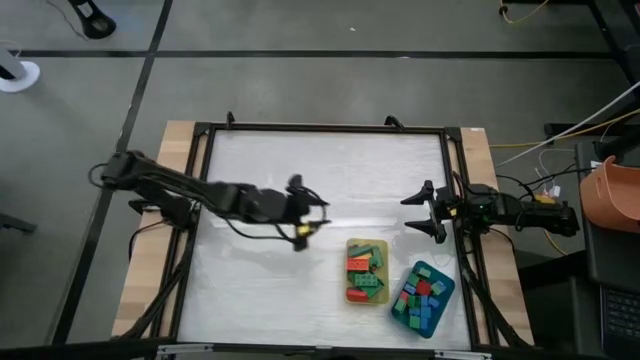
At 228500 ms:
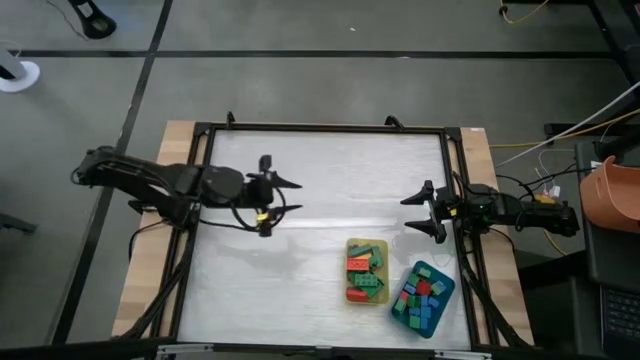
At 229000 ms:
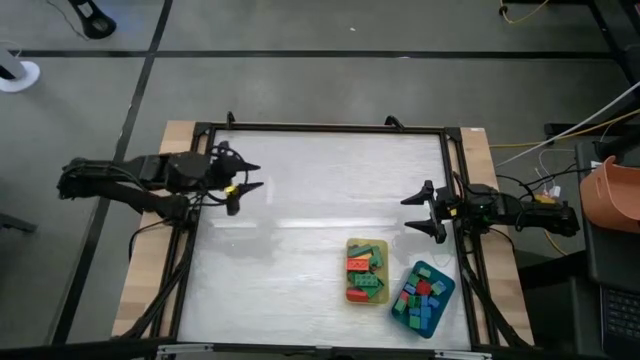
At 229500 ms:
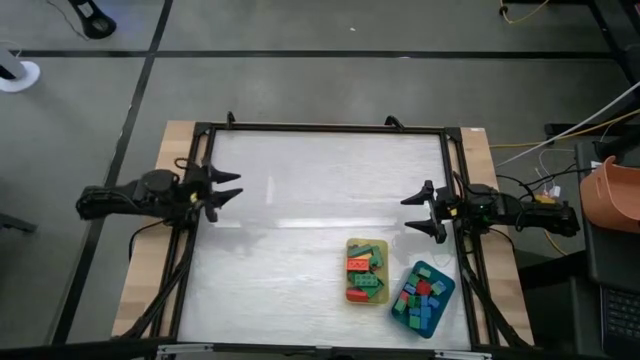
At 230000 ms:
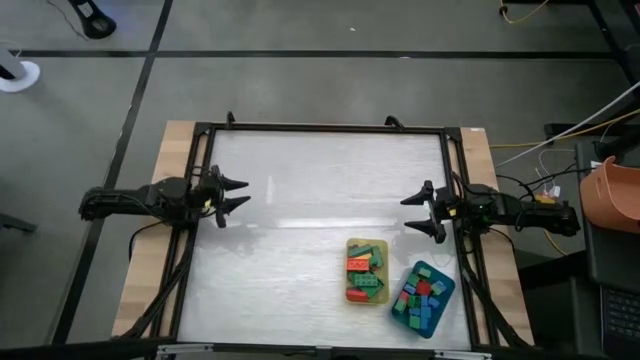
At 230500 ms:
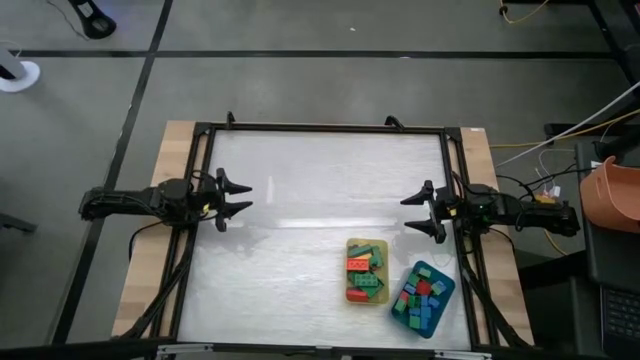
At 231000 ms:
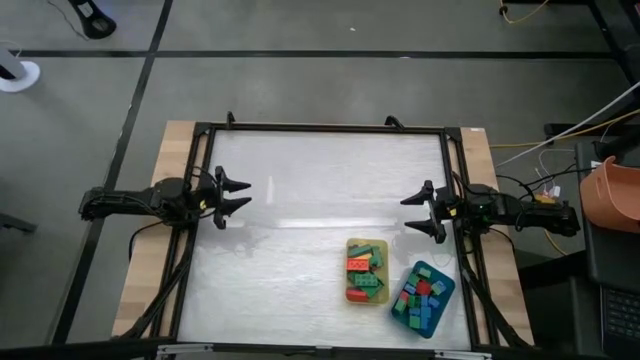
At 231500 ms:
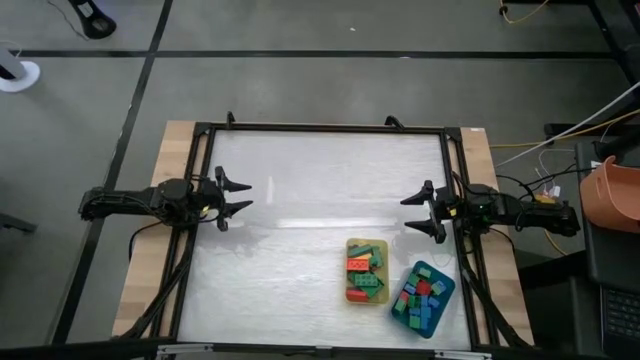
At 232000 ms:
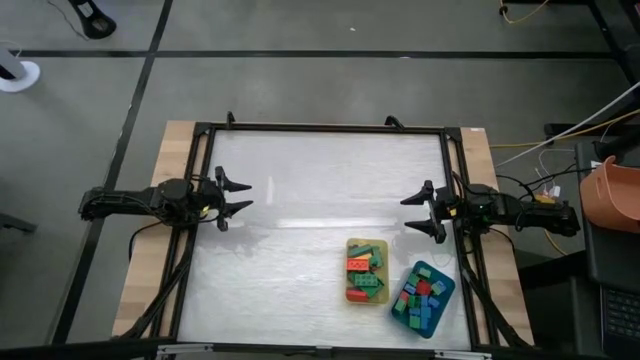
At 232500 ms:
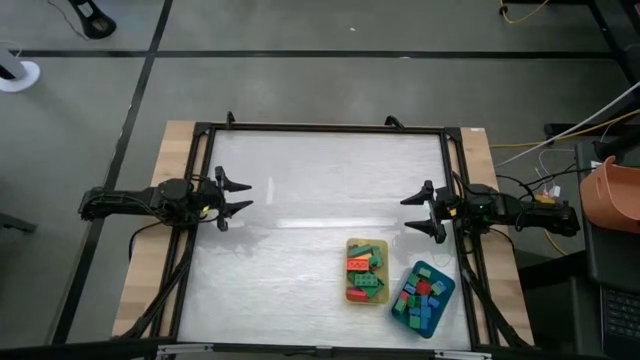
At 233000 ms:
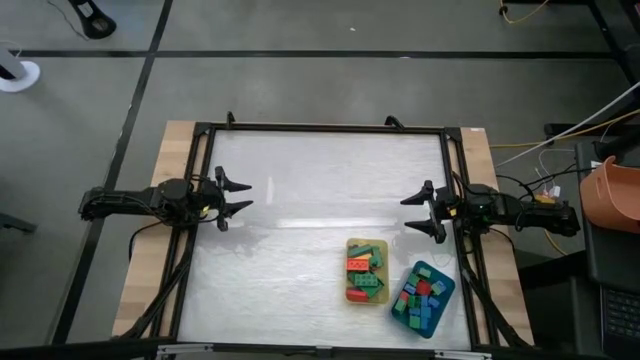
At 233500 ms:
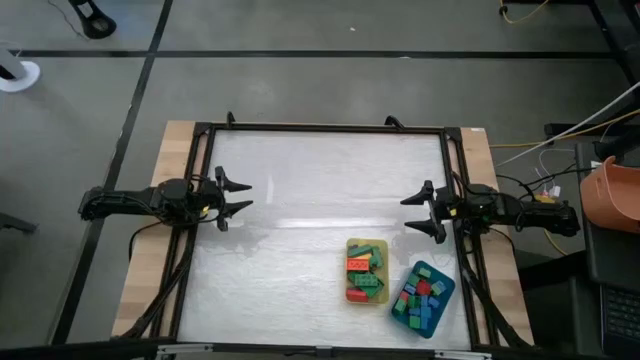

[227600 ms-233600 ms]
Task: Sort blocks by size
Return to Home Position

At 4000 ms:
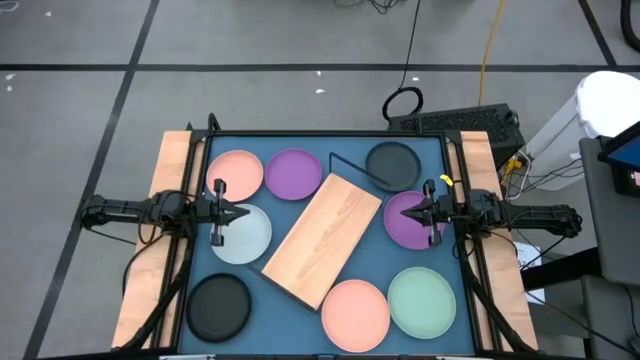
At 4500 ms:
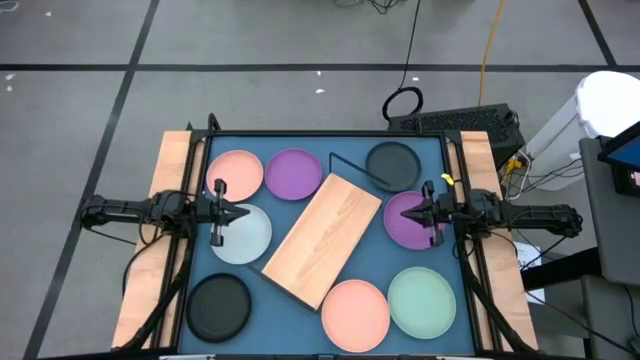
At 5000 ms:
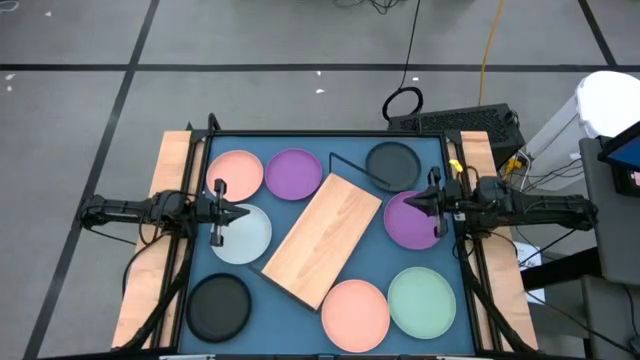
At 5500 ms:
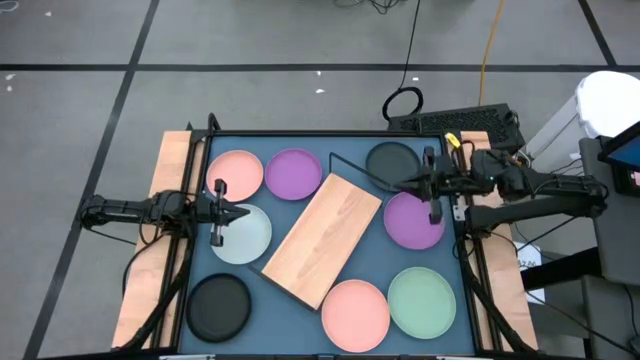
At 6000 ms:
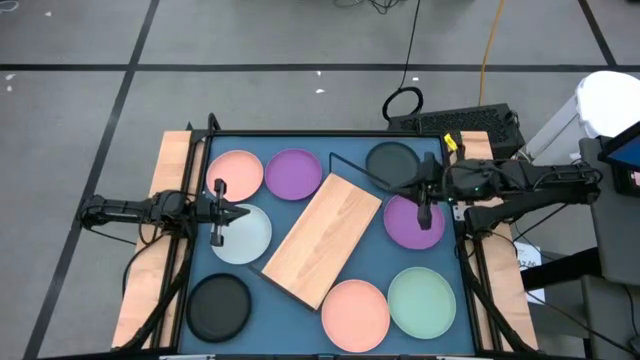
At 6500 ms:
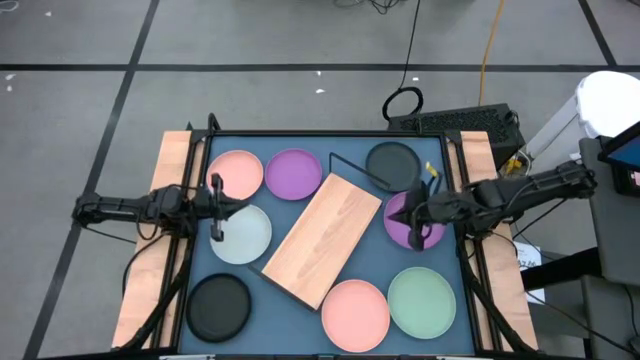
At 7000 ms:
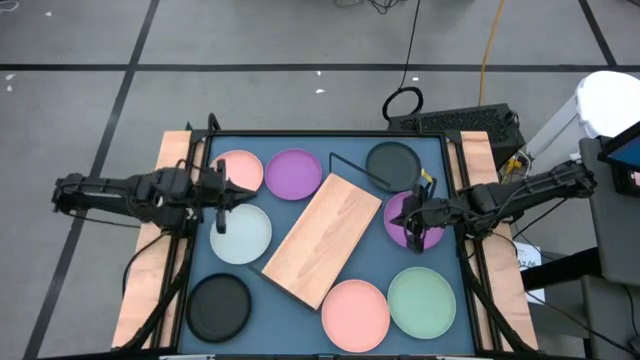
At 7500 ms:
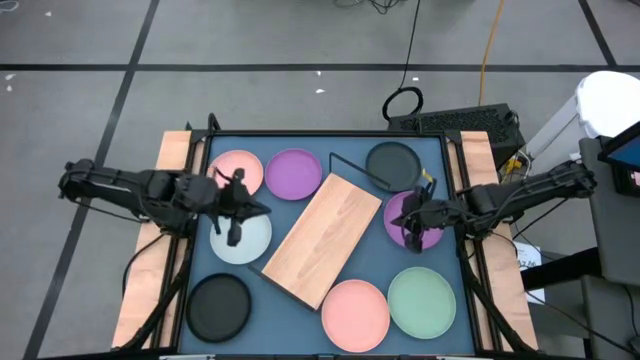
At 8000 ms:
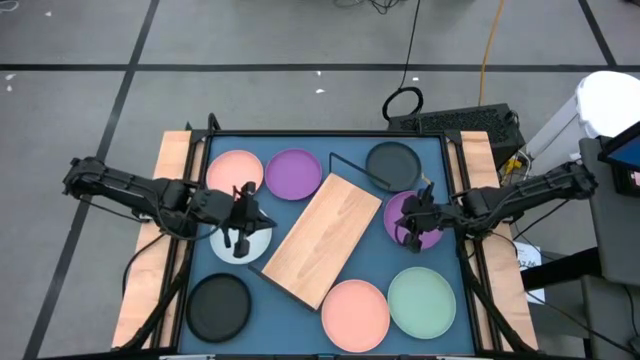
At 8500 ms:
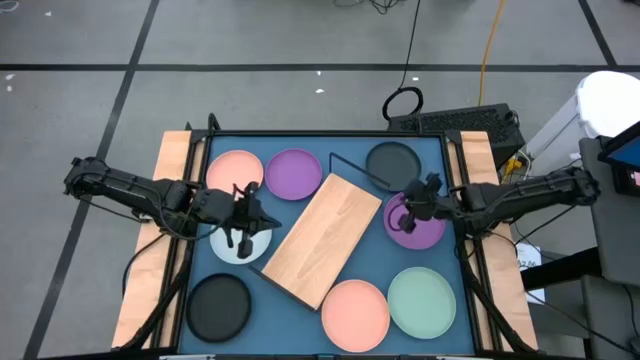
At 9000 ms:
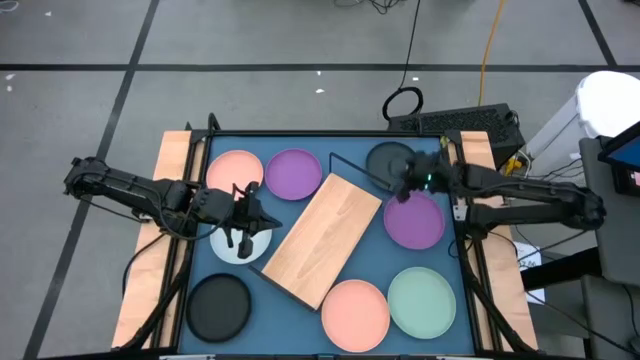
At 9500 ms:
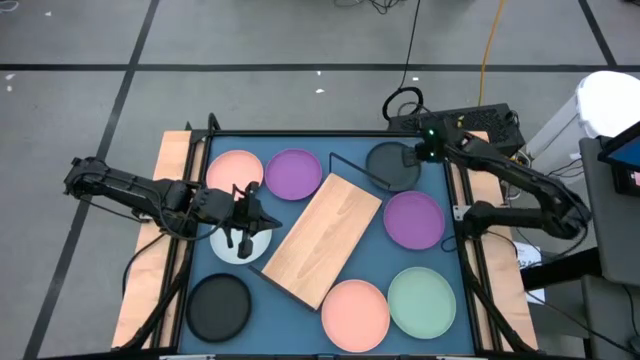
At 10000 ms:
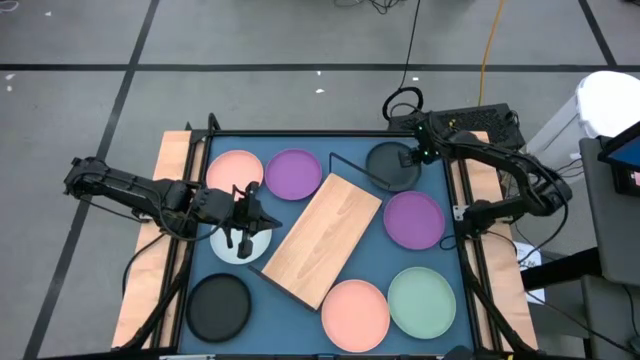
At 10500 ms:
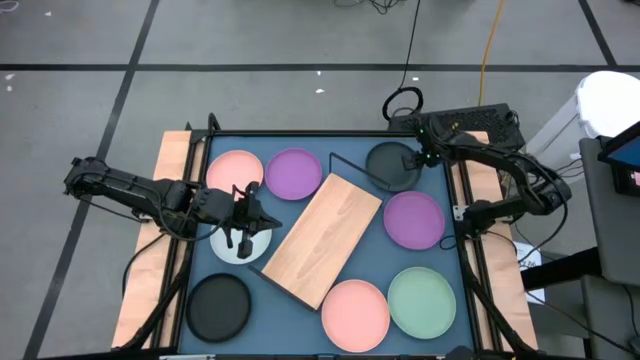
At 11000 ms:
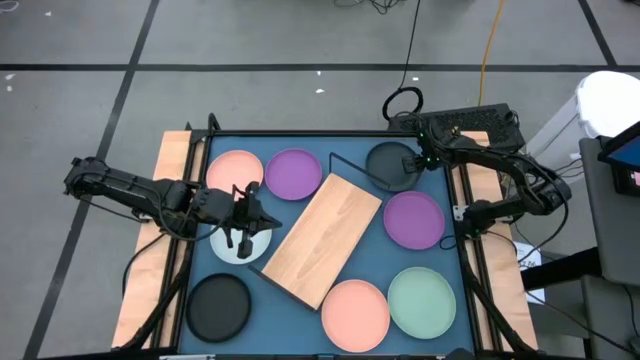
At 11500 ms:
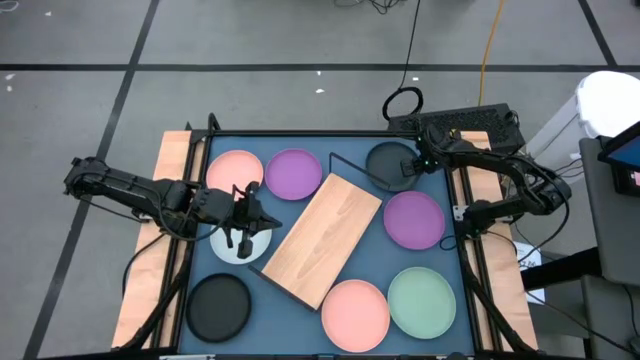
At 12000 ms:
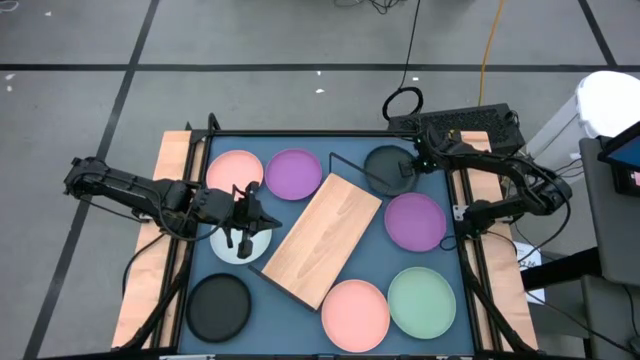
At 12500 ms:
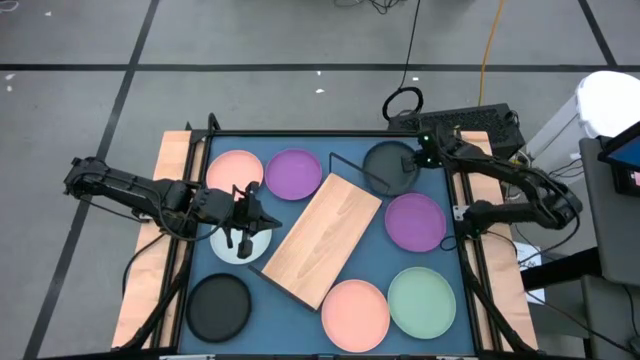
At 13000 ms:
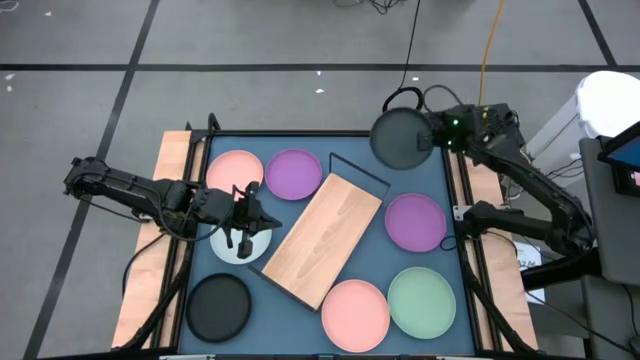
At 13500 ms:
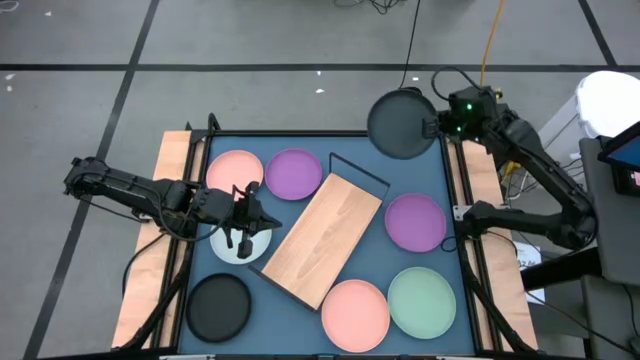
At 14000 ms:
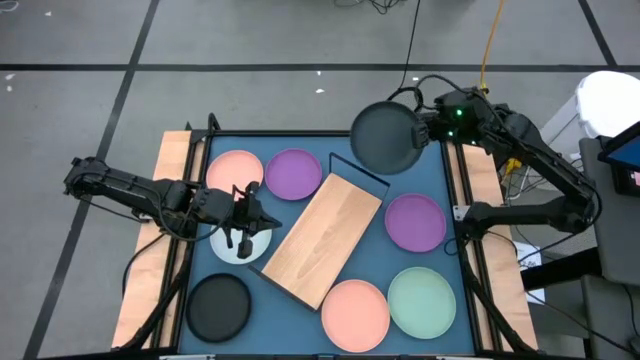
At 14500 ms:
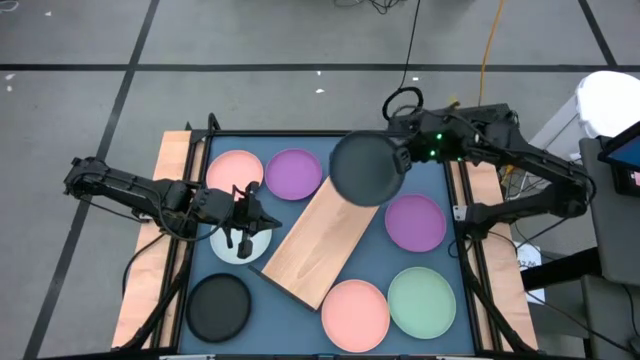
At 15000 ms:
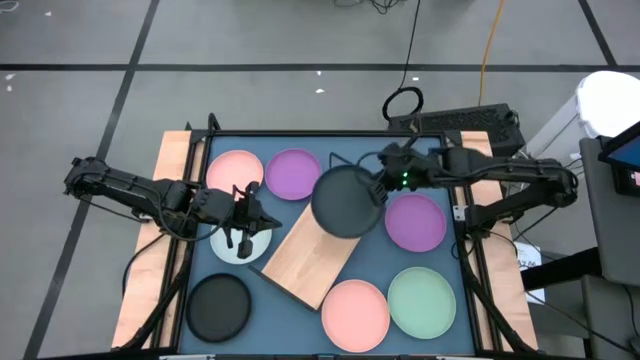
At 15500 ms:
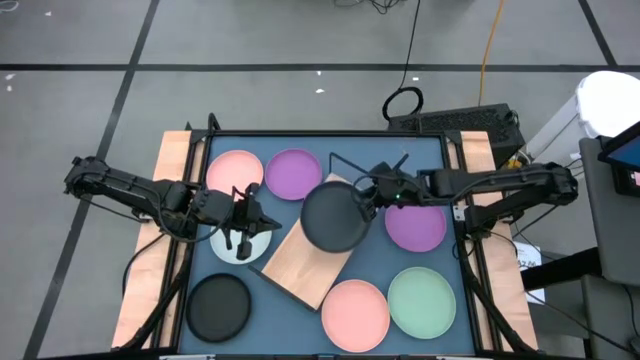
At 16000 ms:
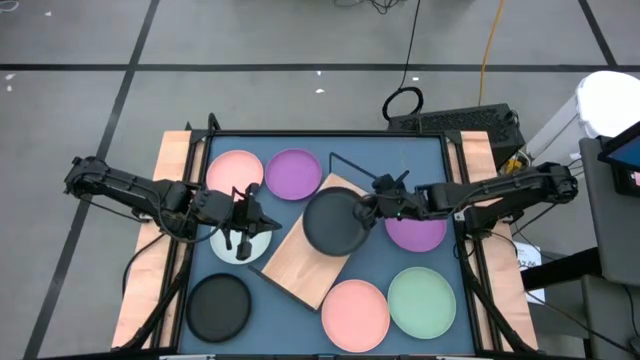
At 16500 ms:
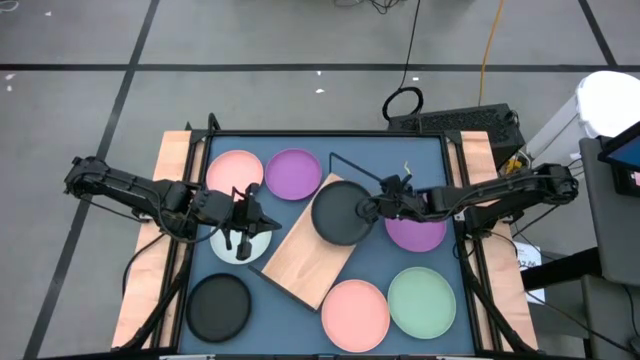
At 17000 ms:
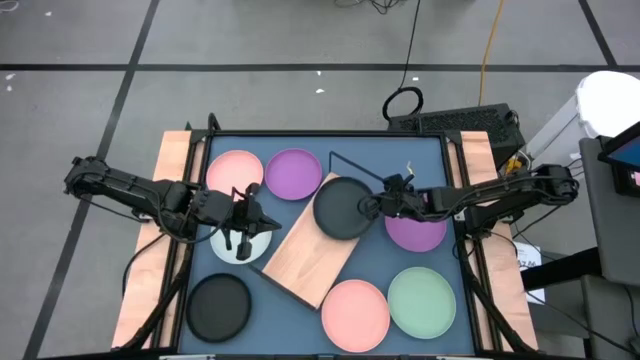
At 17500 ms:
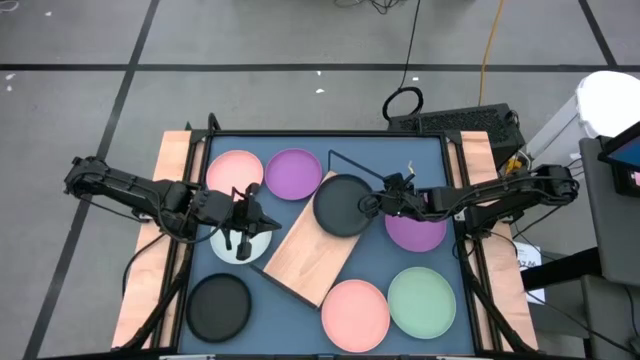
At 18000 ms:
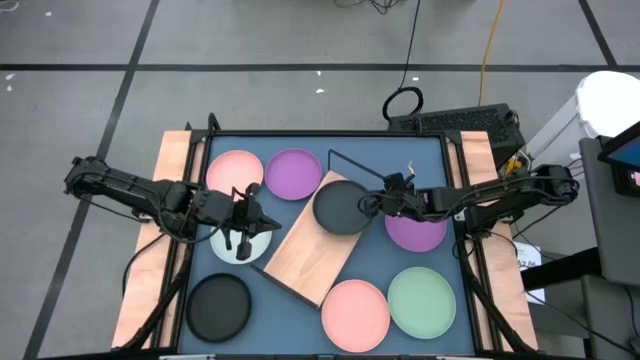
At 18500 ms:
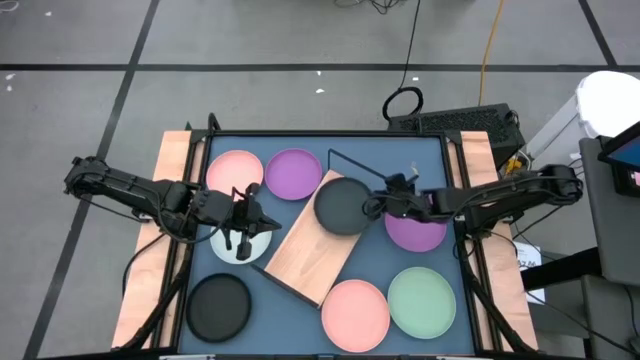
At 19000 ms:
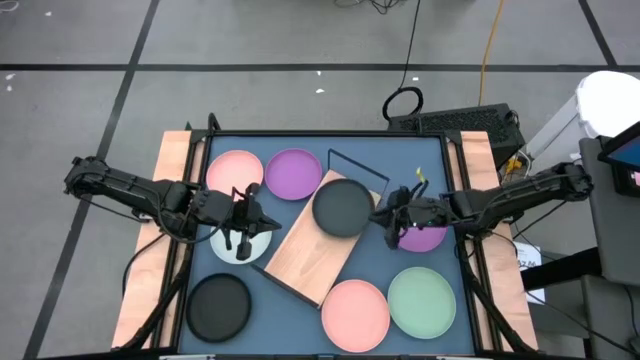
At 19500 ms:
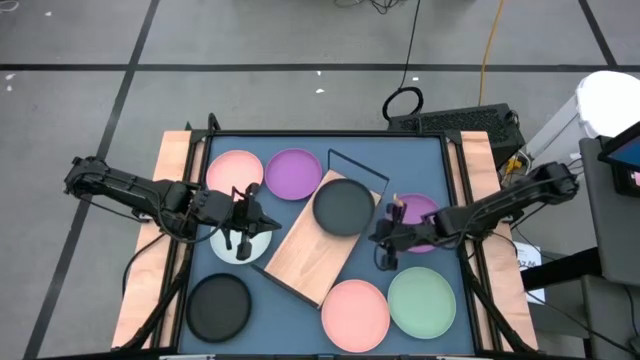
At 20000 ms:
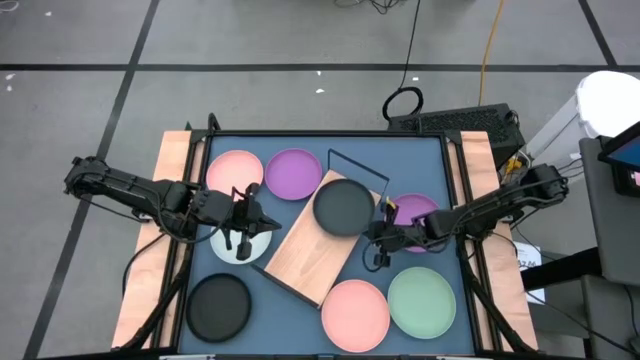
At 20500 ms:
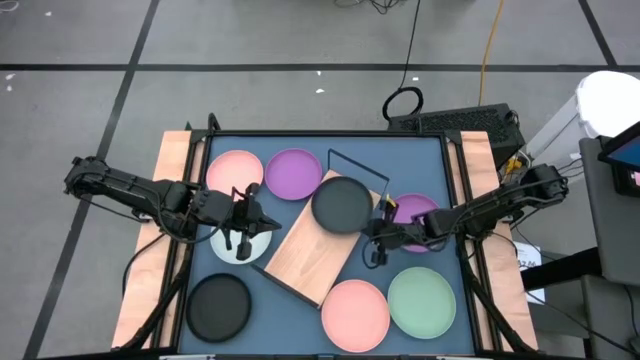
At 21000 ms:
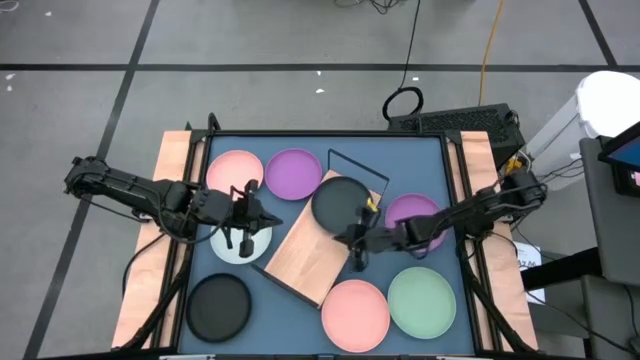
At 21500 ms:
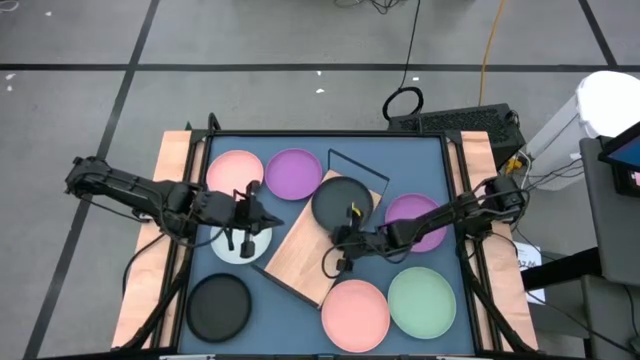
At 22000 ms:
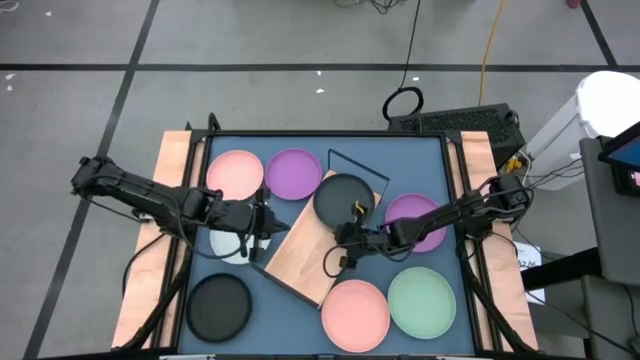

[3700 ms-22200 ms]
Task: Place and stack plates onto a shelf
Put the top black plate on the shelf
